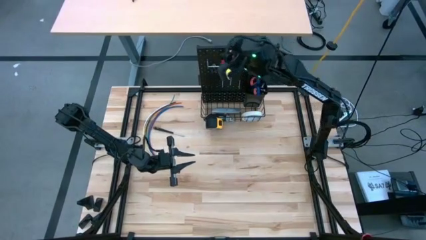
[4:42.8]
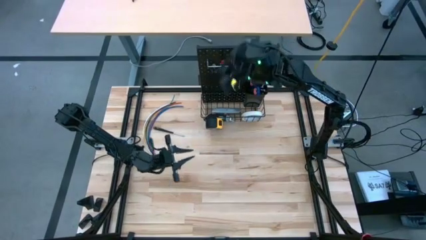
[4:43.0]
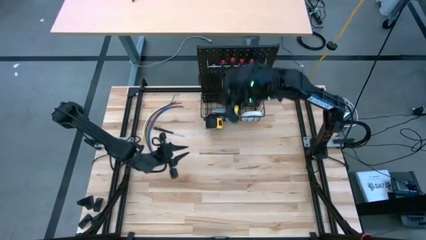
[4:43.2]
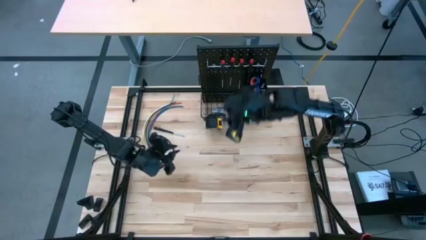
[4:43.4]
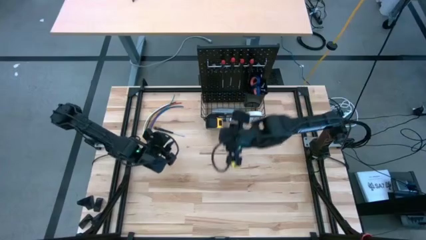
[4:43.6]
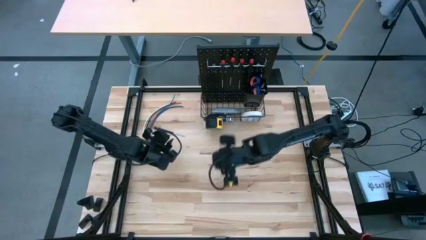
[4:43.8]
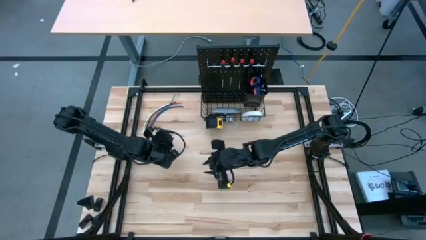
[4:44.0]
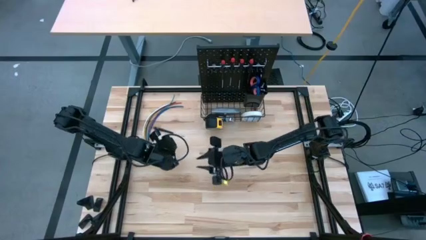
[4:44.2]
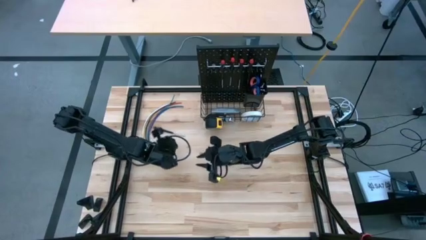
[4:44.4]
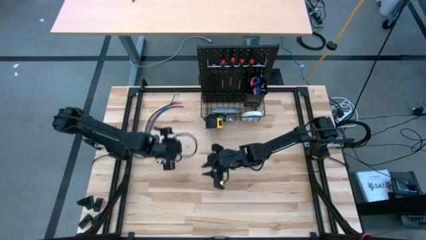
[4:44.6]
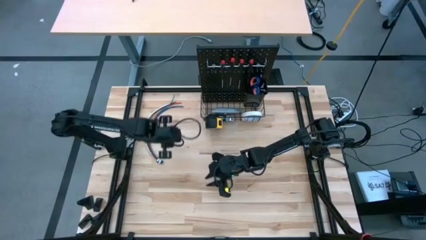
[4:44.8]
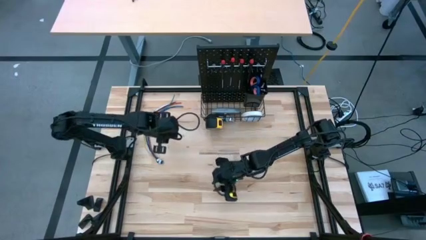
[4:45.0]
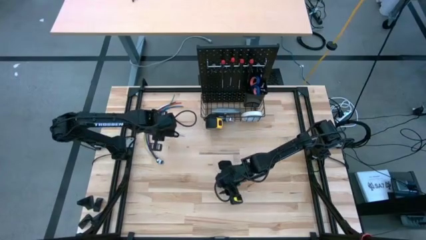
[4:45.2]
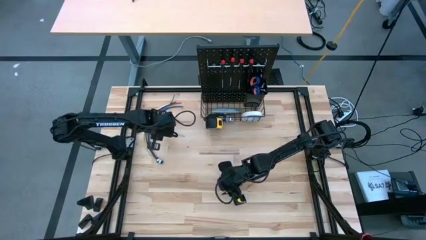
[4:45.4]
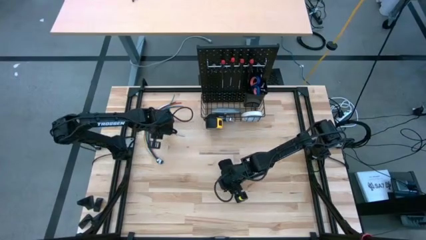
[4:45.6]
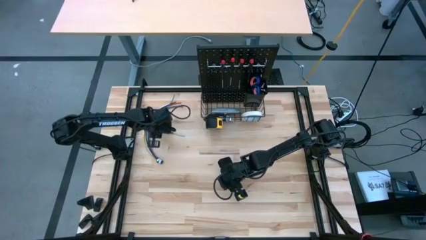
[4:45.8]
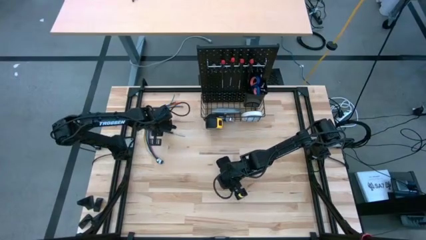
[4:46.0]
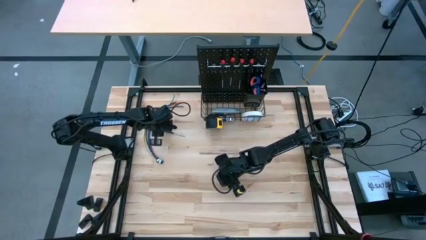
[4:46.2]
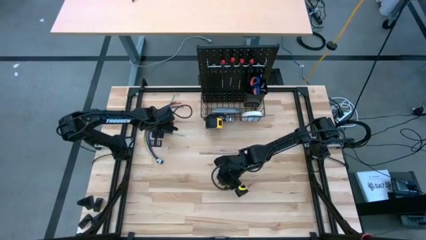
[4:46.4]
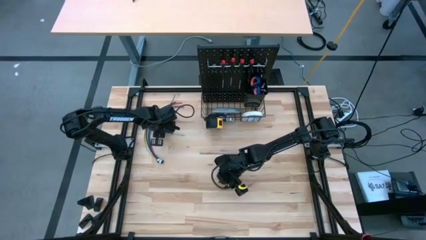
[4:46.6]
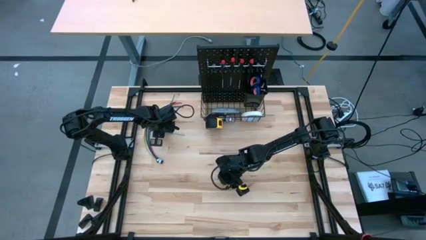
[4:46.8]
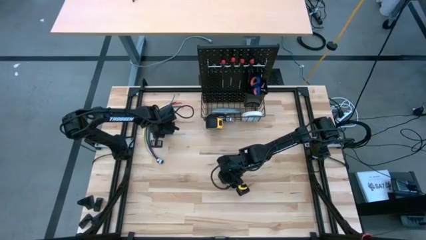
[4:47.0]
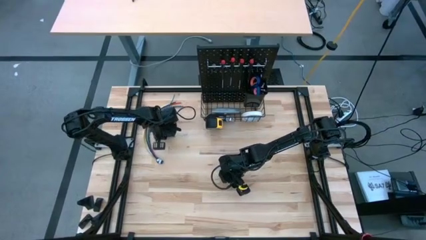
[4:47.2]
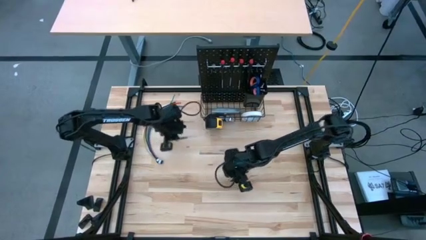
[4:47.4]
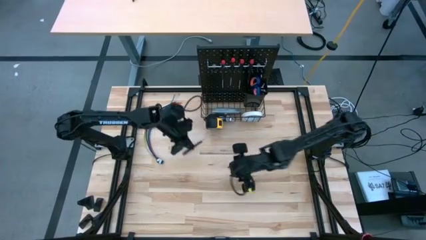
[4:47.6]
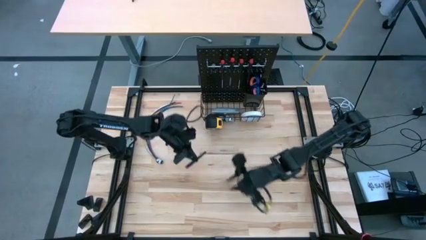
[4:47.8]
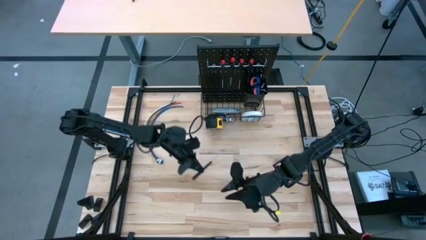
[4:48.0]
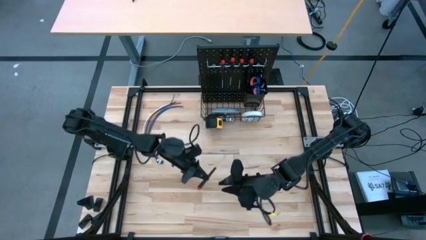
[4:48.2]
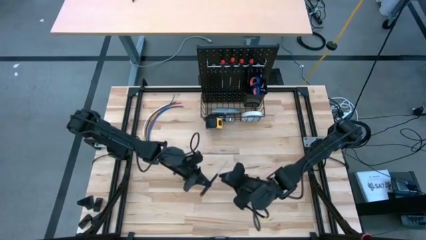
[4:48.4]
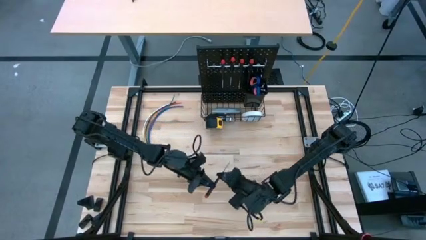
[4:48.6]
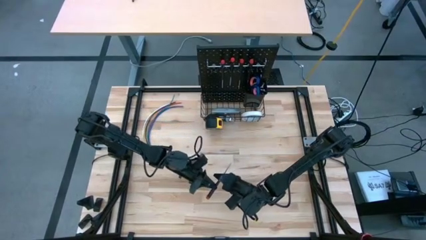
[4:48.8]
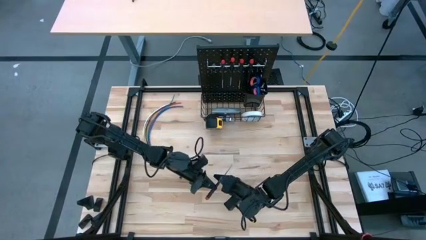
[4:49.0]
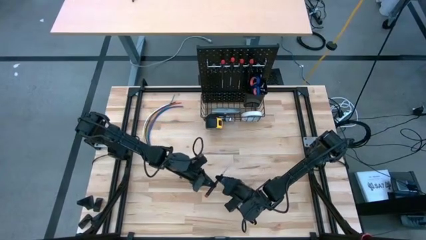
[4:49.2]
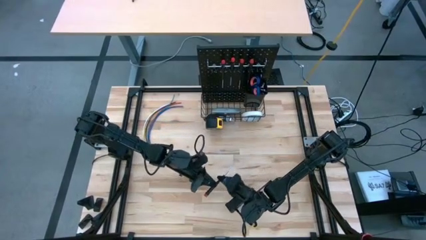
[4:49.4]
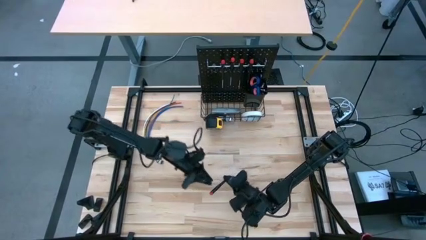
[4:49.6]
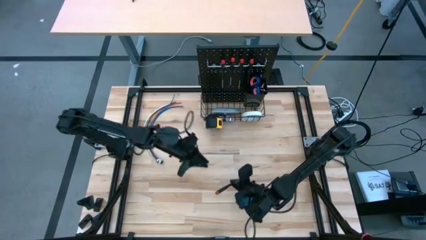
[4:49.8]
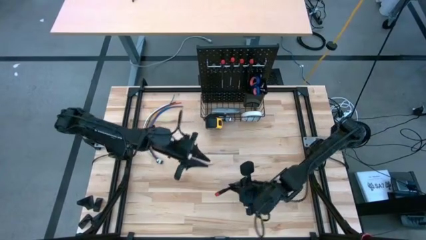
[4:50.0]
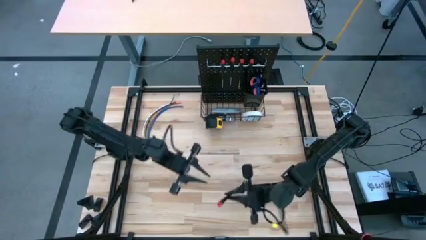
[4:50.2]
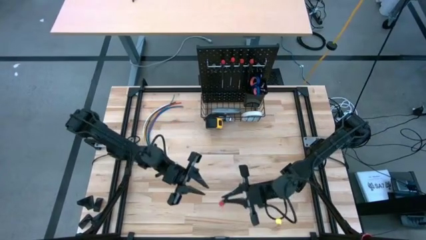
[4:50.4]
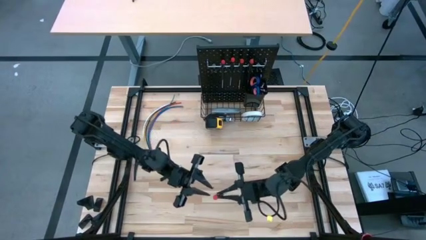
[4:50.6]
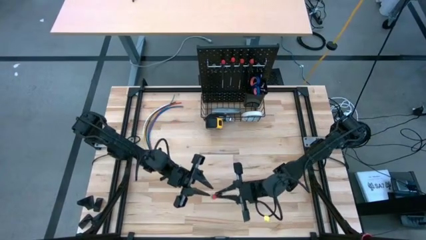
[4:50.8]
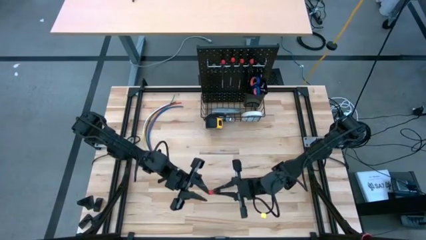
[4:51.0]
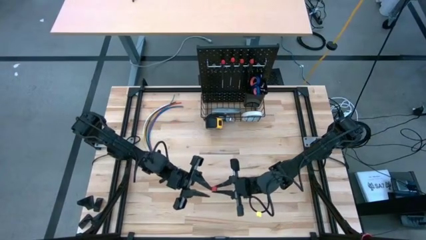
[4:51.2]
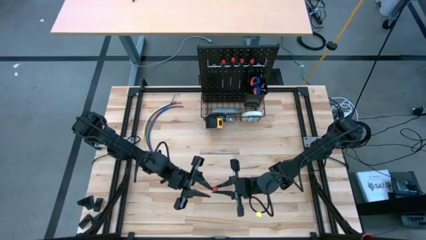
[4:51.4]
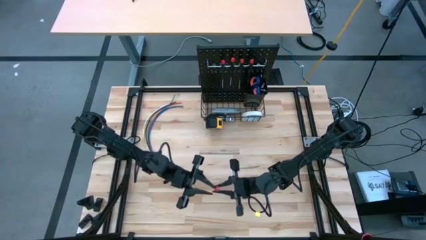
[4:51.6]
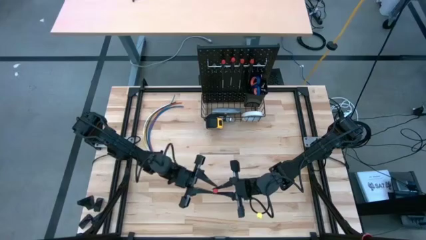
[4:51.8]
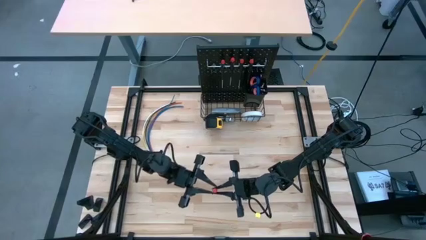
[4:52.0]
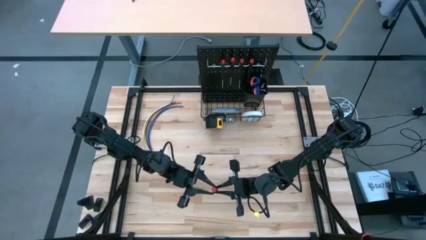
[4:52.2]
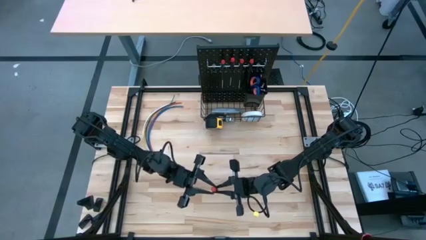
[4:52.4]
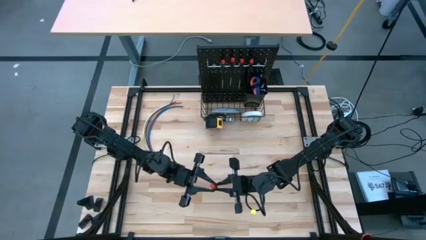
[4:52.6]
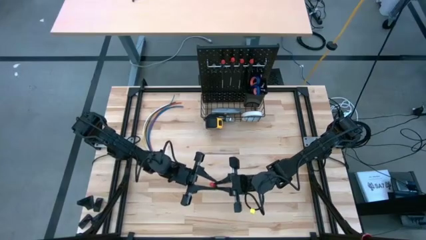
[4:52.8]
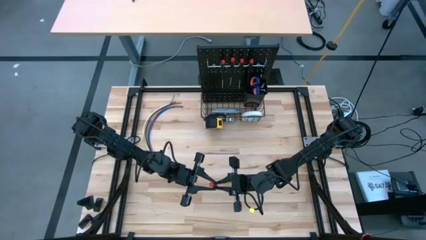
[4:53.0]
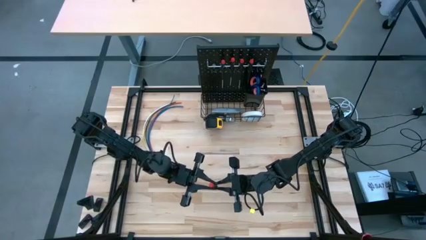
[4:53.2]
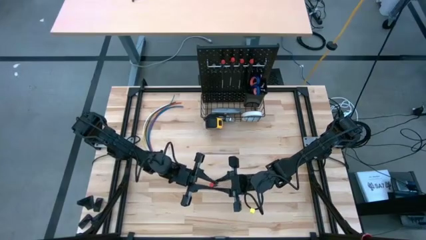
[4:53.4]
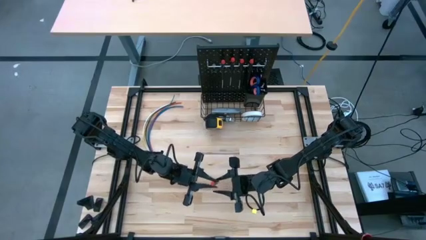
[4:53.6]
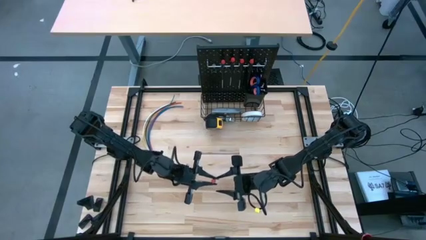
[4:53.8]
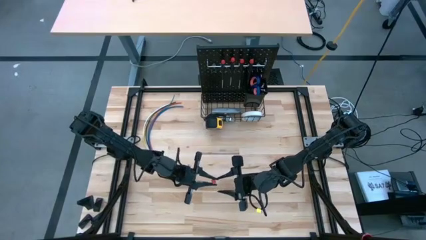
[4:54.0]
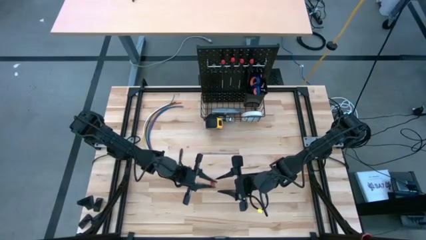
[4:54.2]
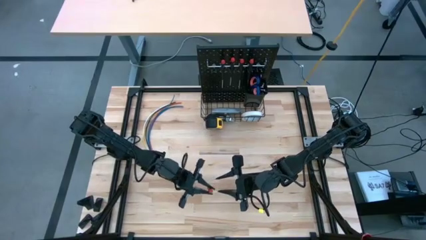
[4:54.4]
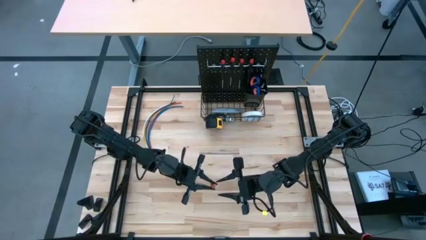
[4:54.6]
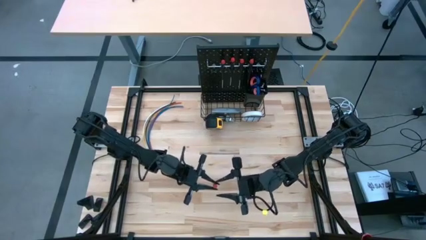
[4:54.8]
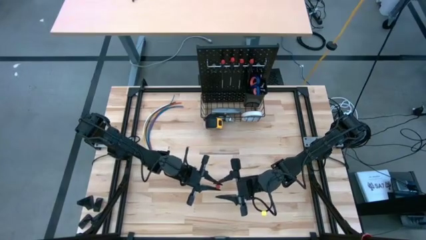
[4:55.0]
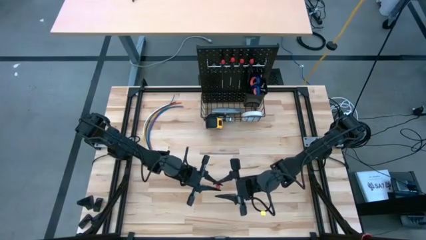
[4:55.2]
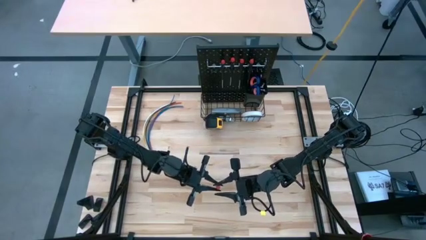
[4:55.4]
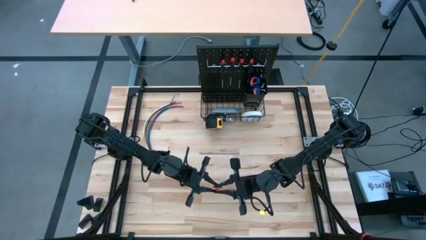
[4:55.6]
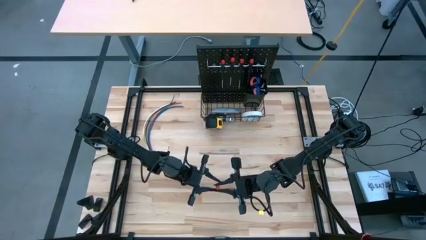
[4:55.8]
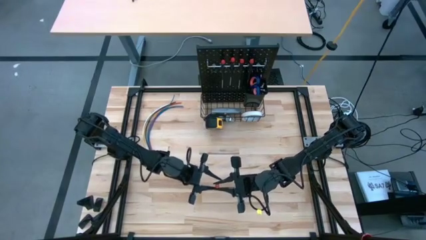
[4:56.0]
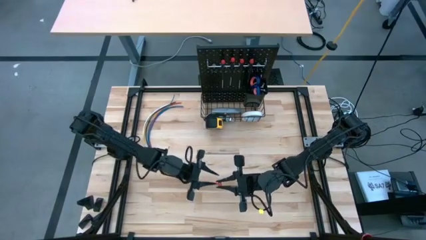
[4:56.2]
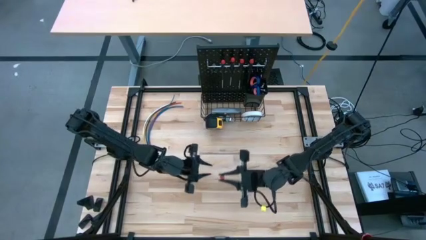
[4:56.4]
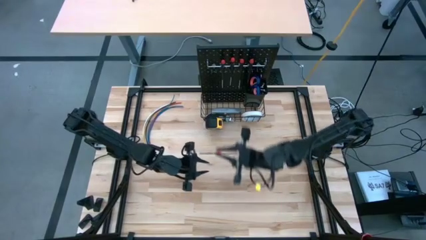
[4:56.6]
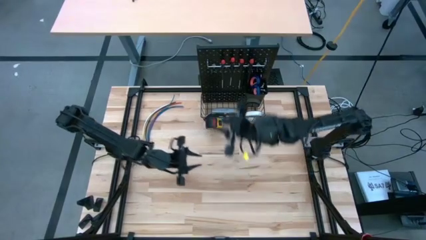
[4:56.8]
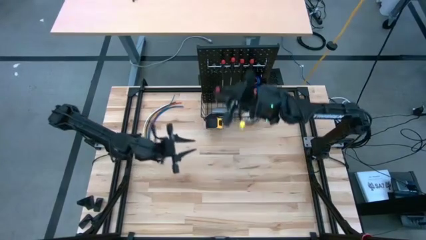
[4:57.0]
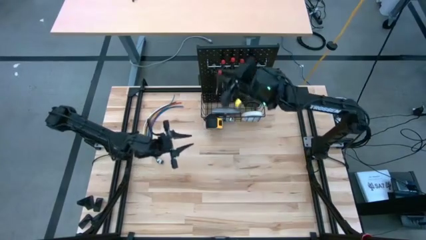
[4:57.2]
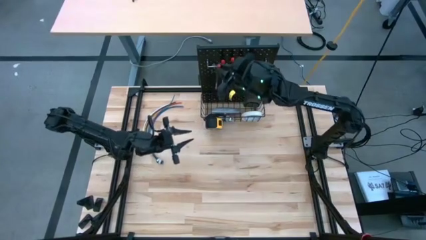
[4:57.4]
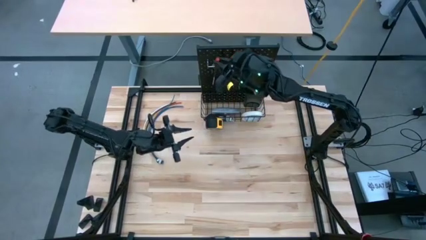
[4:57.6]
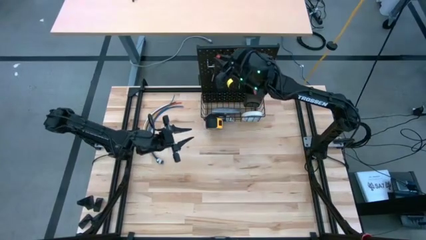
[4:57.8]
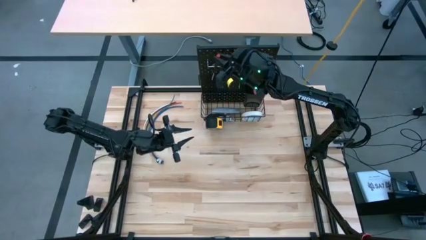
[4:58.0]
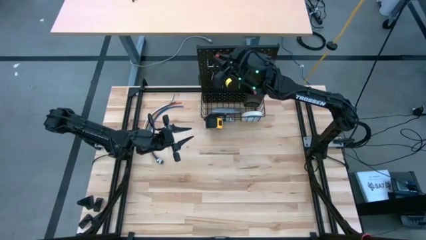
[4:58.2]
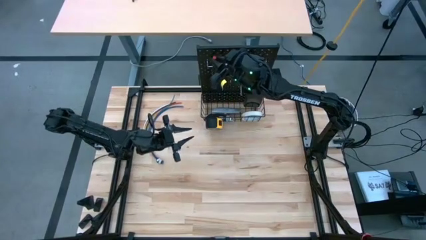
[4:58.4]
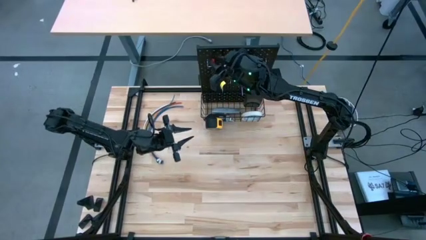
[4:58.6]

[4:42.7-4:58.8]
Task: Hang tools onto peg board
Hang the nut driver on the pegboard
